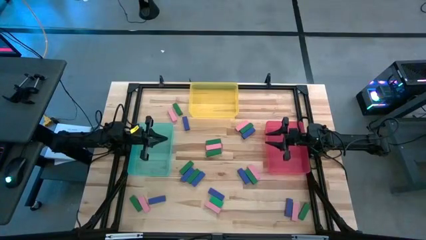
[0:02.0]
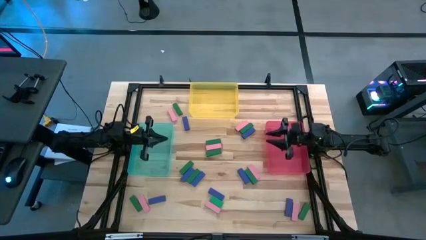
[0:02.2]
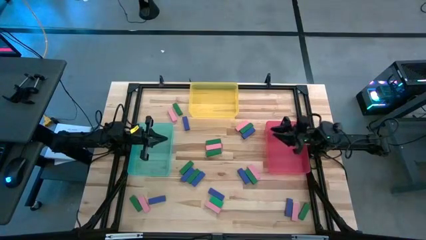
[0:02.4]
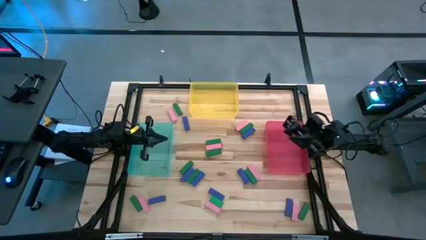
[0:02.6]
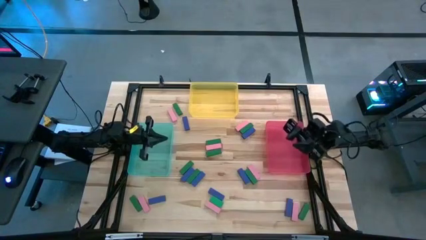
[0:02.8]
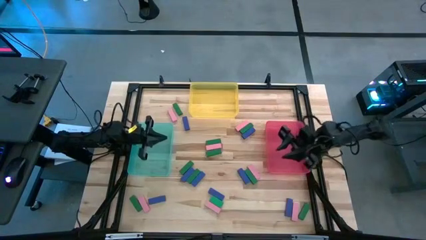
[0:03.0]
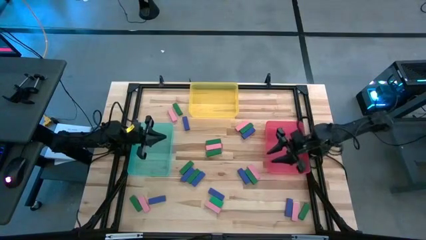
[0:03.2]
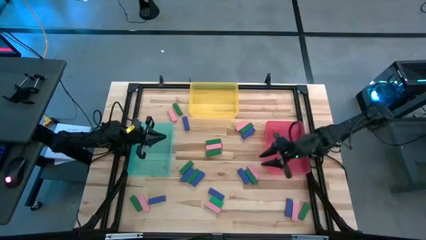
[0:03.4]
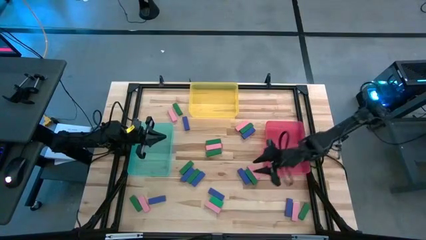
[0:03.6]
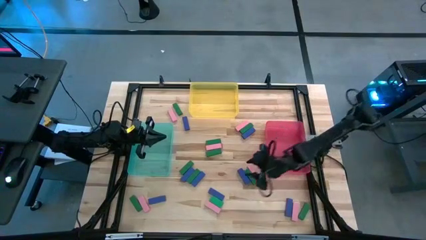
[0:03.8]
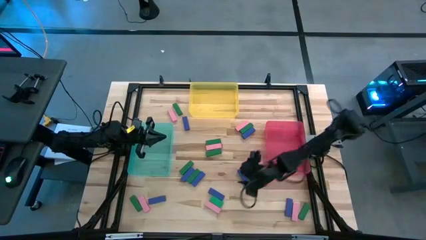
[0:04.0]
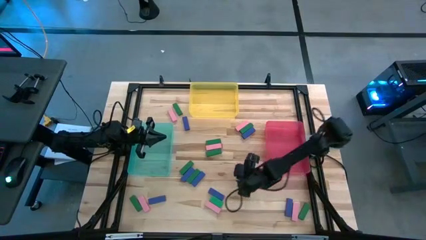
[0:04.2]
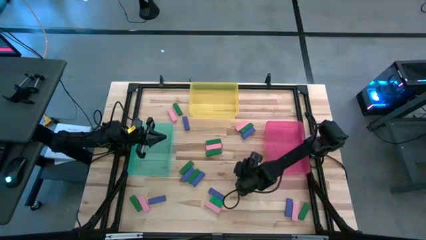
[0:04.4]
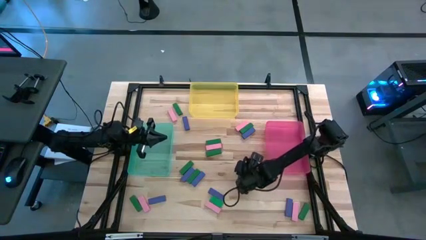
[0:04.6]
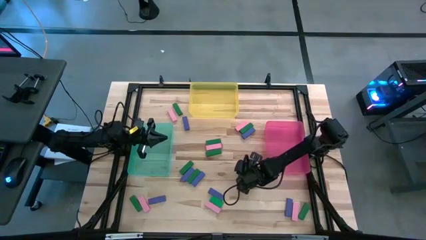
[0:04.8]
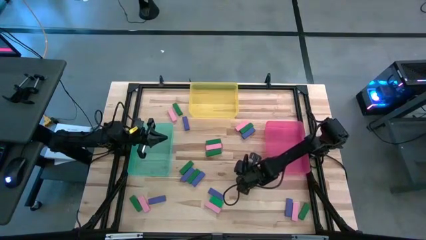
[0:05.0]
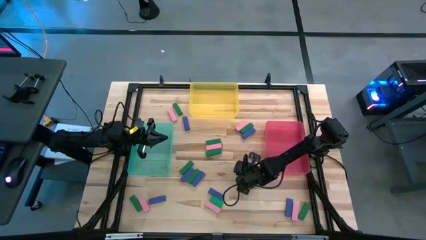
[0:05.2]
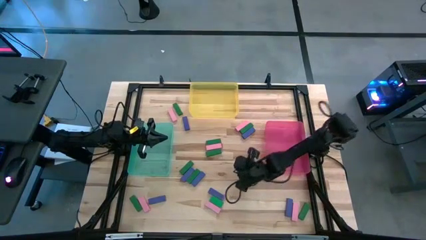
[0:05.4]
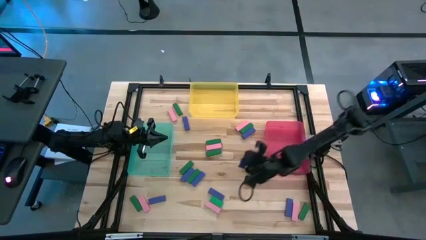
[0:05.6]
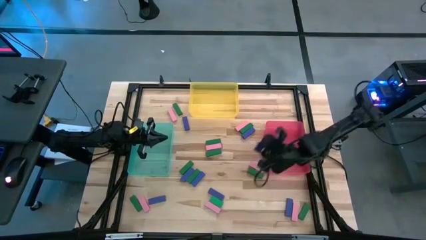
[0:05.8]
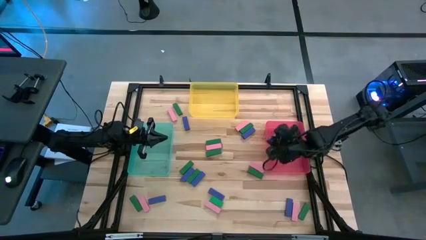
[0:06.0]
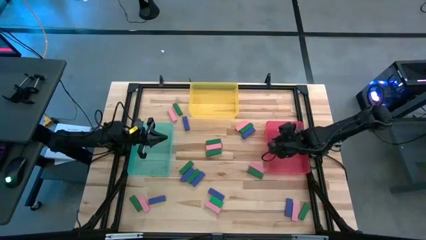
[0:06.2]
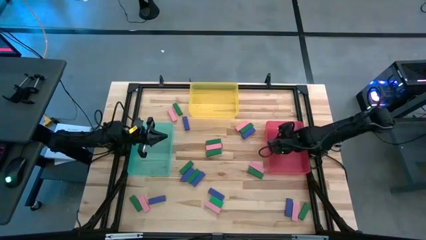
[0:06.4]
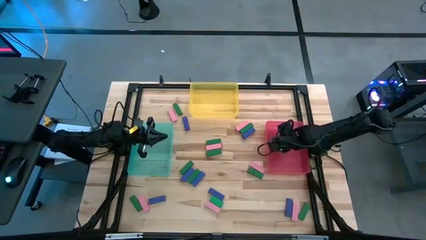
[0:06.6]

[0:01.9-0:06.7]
Task: Sort blocks
Put the blue block into the pink bin

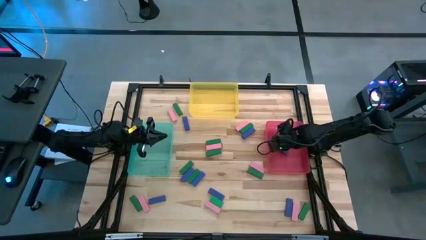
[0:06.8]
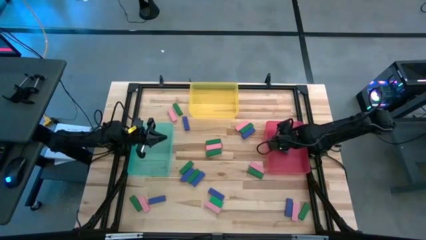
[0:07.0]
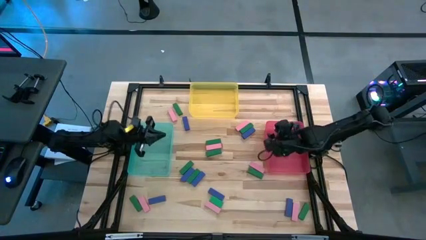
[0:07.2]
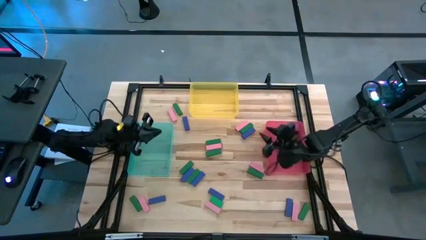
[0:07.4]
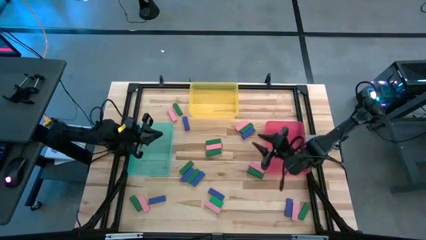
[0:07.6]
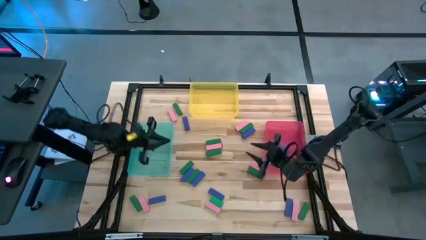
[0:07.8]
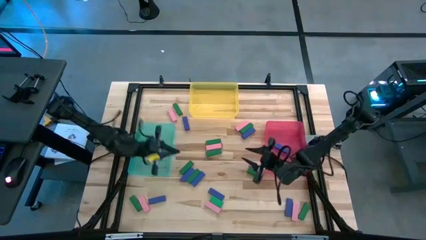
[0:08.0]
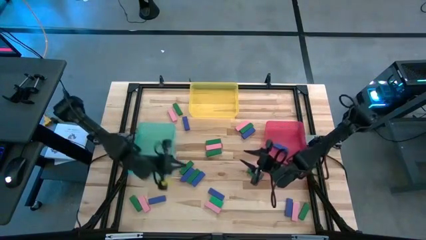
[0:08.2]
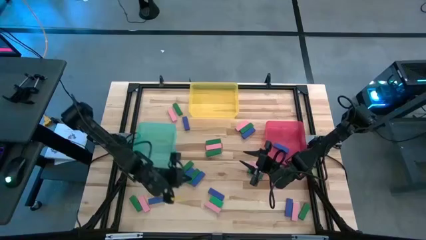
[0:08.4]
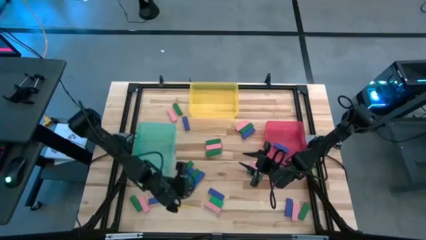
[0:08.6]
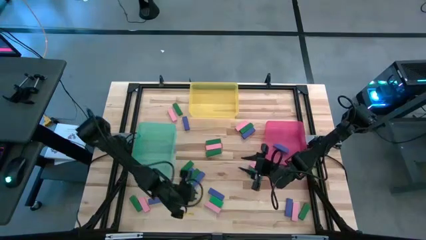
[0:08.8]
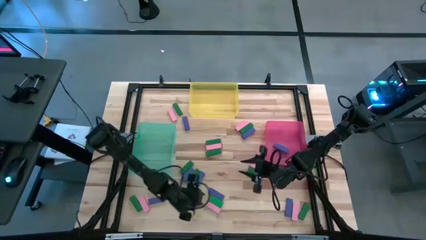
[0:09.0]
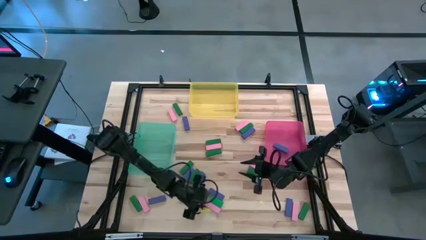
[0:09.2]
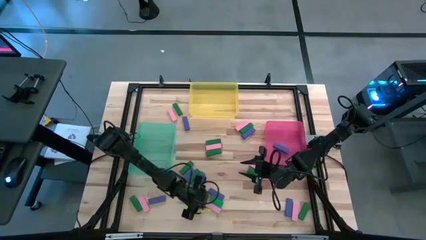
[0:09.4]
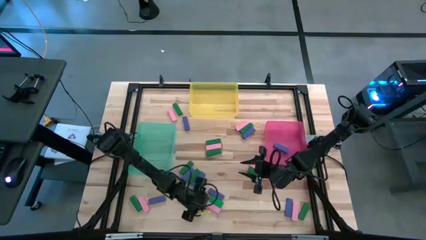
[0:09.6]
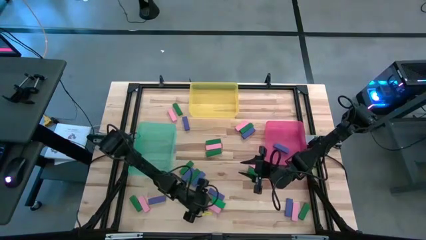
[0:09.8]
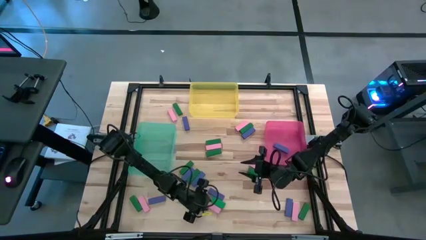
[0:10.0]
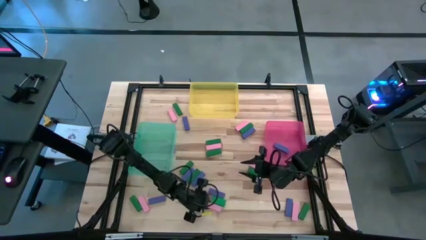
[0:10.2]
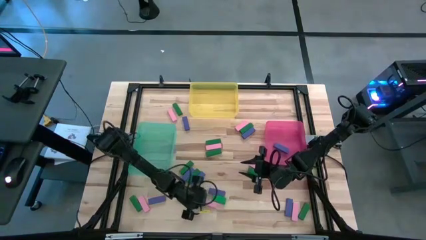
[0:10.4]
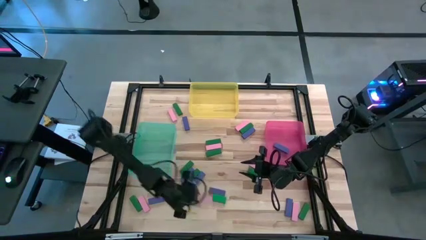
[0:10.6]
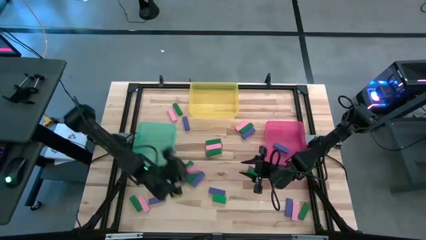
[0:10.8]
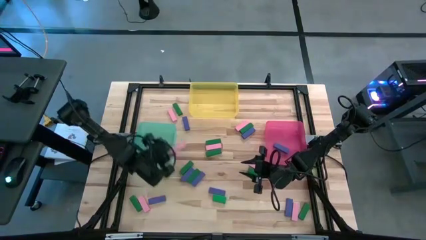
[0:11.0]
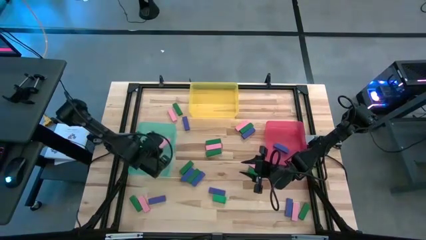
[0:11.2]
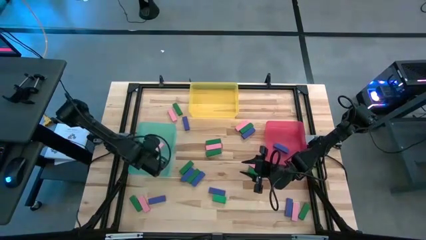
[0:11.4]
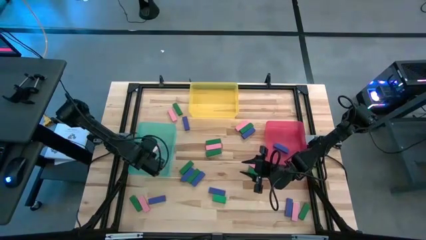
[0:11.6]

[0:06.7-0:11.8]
Put the pink block into the blue bin

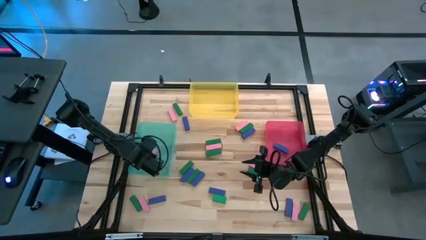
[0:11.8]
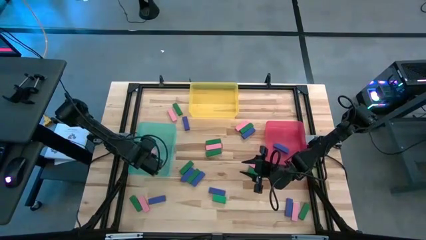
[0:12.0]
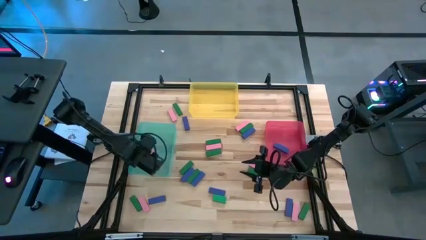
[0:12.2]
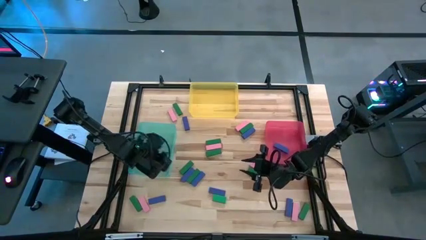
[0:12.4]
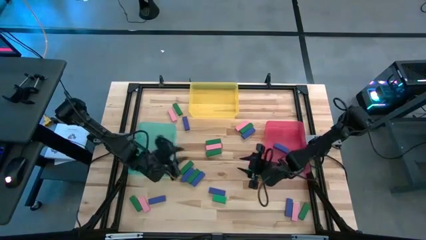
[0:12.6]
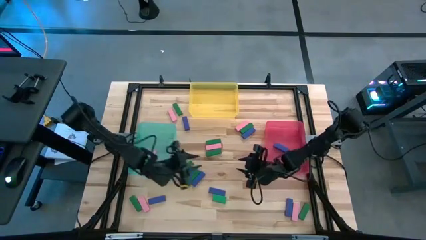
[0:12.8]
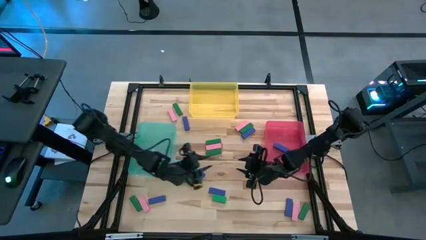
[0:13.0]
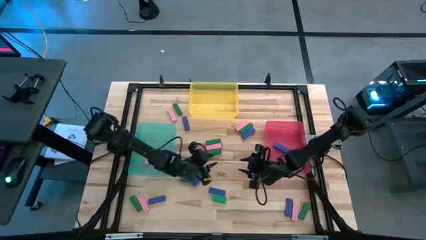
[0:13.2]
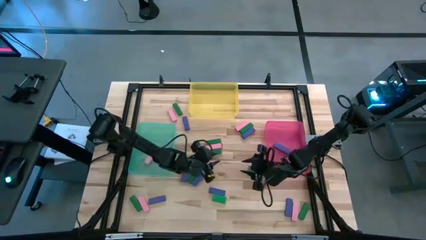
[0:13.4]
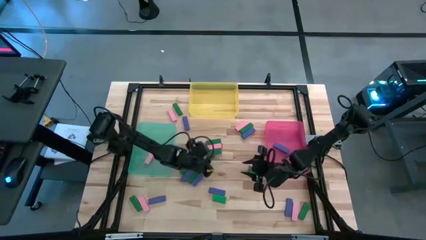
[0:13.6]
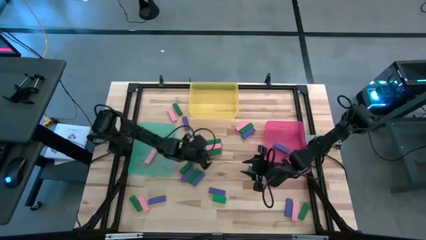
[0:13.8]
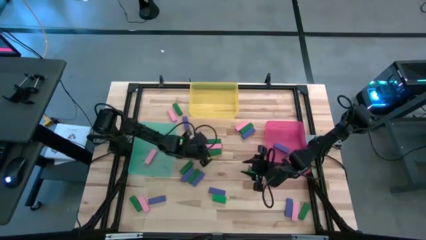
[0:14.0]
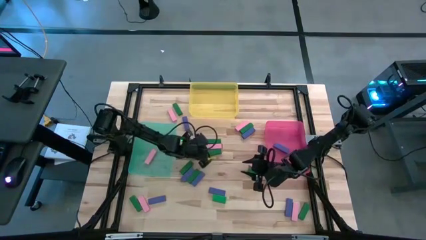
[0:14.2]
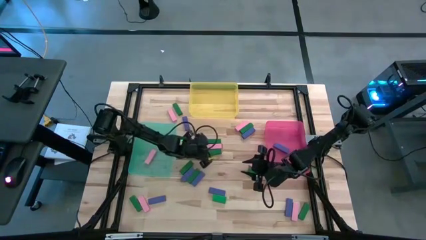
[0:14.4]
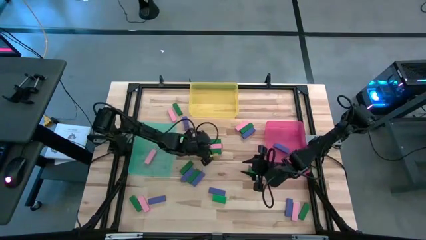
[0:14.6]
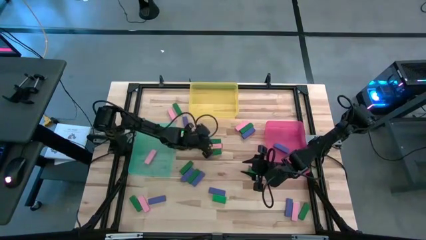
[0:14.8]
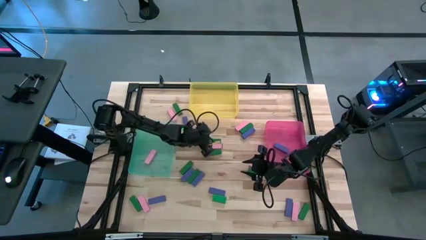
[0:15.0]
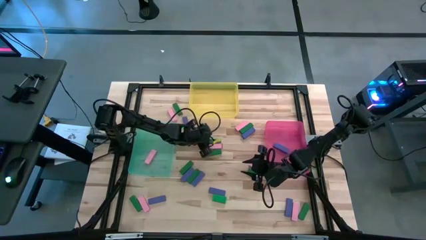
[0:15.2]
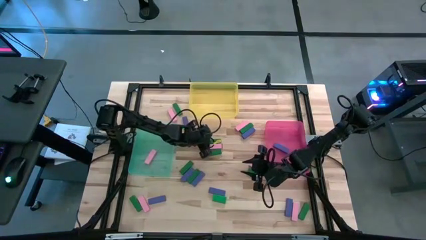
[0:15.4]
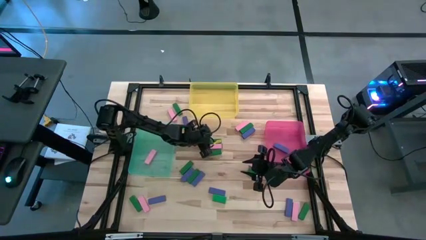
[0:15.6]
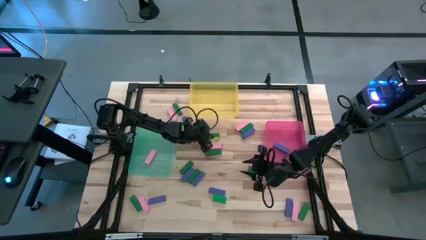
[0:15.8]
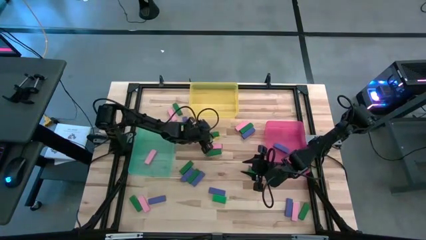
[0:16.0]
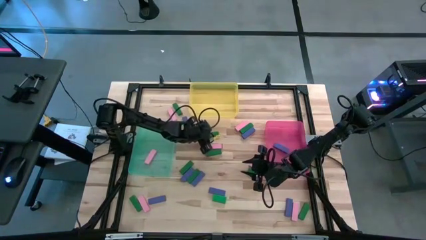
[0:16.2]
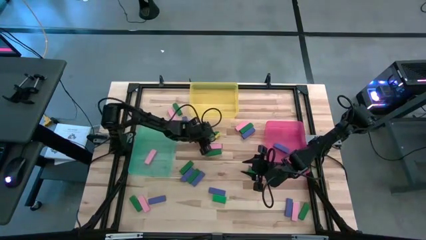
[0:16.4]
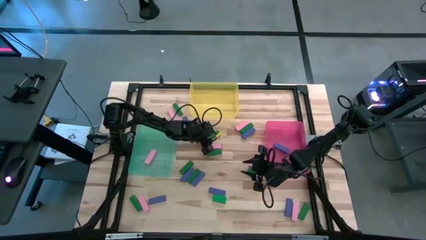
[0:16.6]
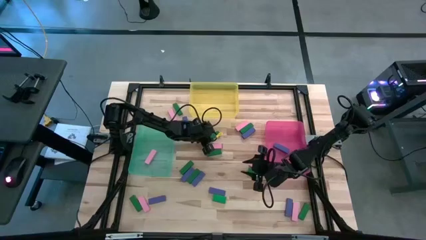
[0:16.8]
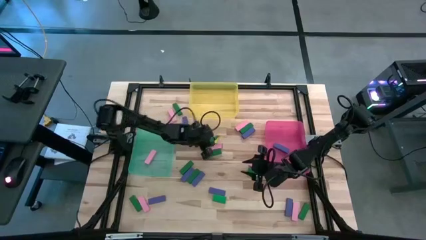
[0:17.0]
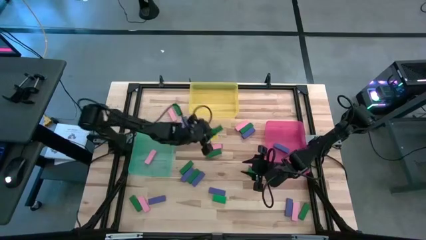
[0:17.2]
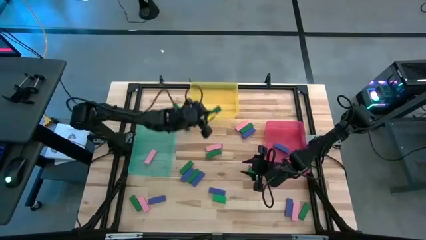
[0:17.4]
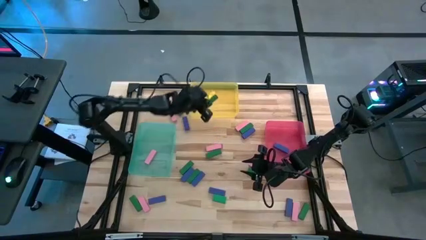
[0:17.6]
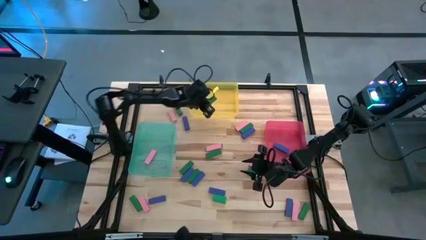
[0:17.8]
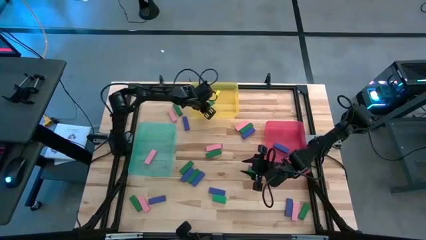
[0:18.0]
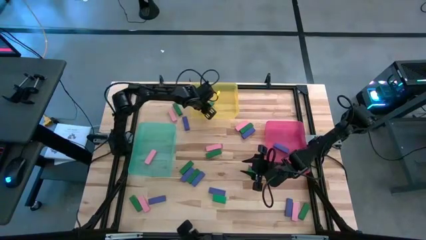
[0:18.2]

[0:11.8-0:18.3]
Put the green block into the yellow bin
